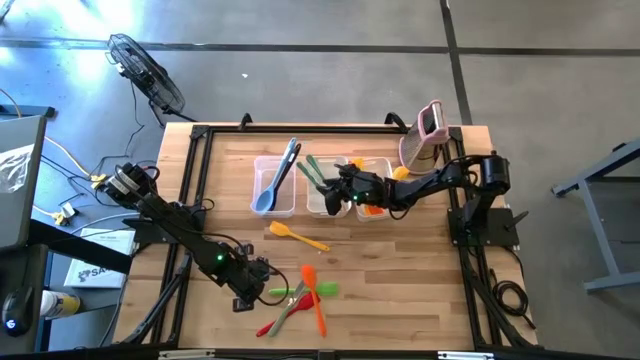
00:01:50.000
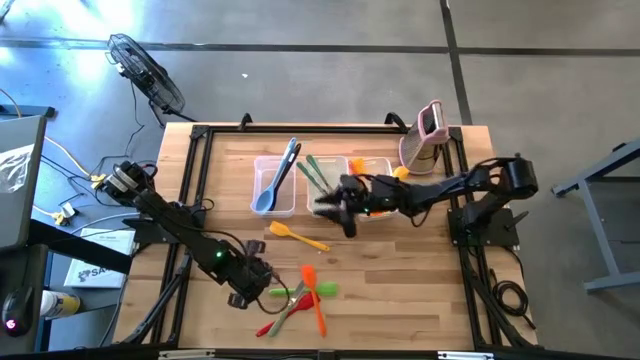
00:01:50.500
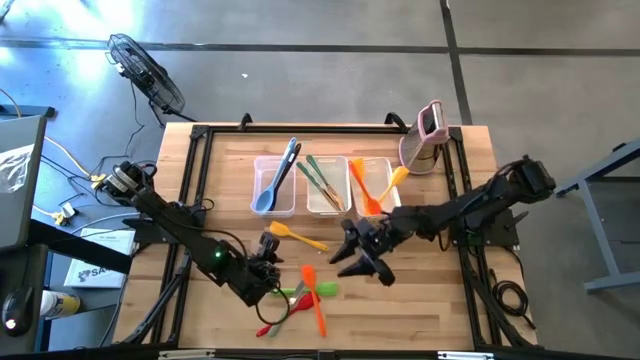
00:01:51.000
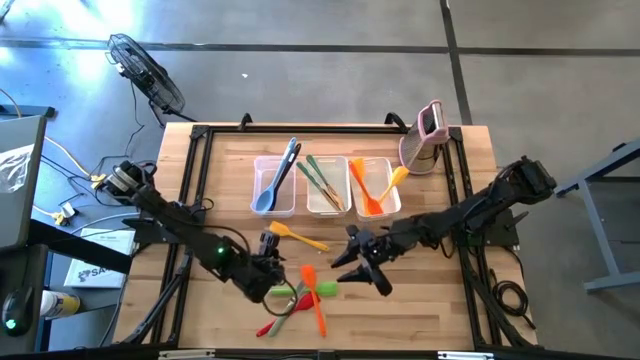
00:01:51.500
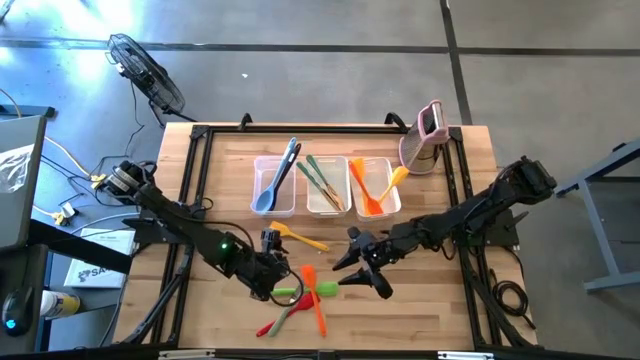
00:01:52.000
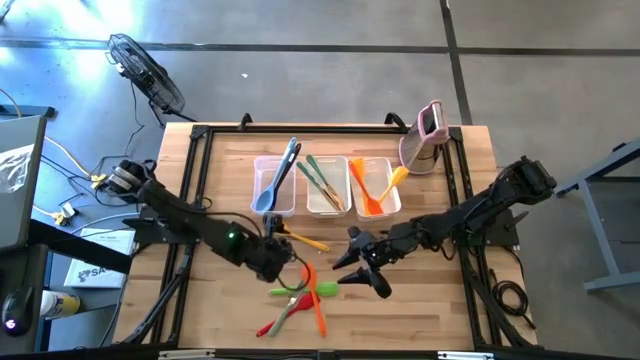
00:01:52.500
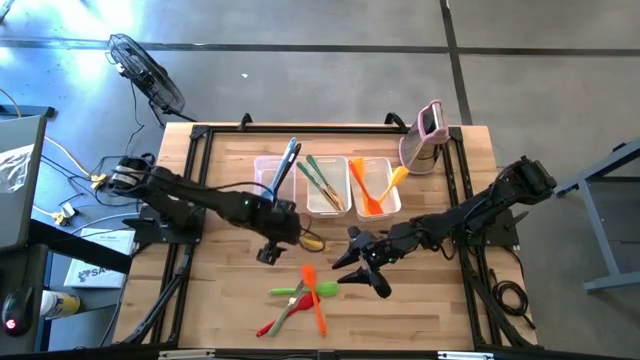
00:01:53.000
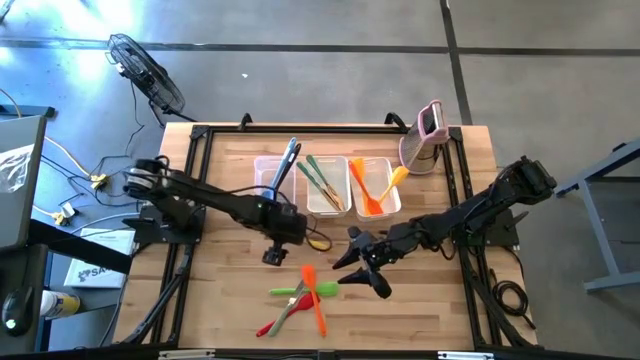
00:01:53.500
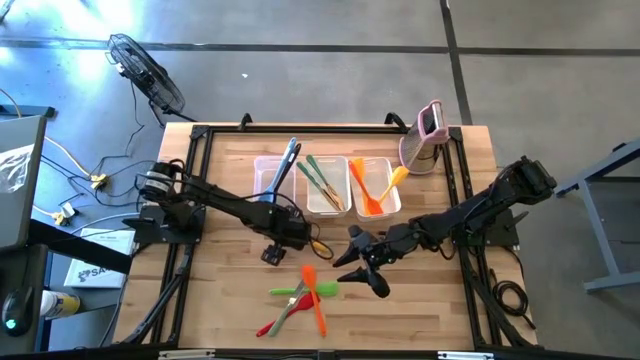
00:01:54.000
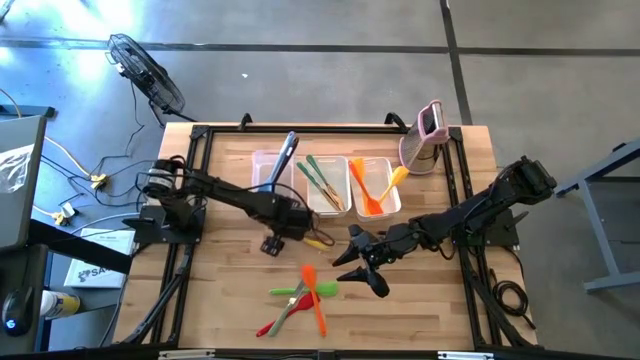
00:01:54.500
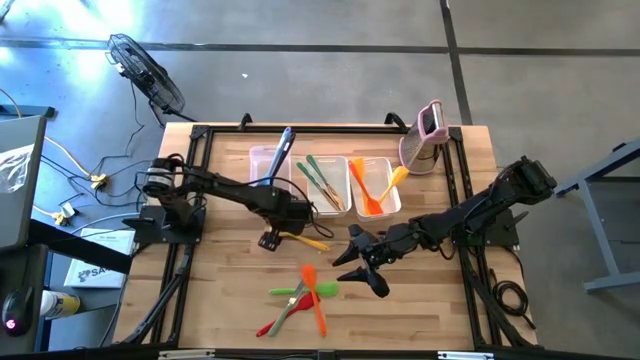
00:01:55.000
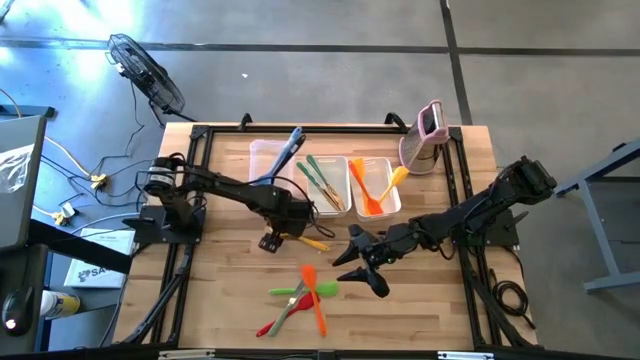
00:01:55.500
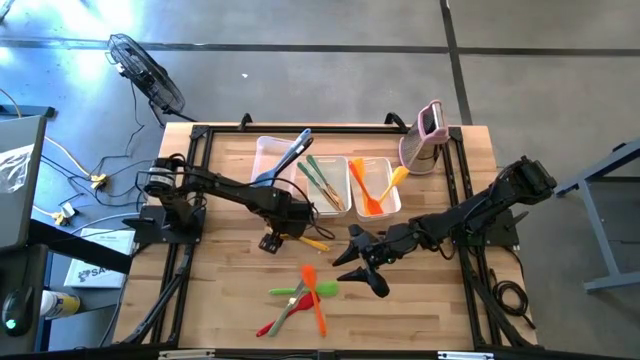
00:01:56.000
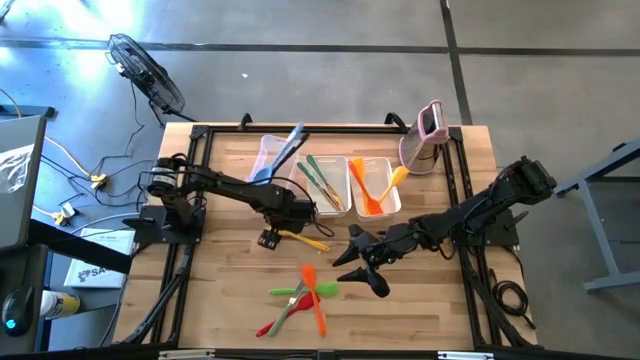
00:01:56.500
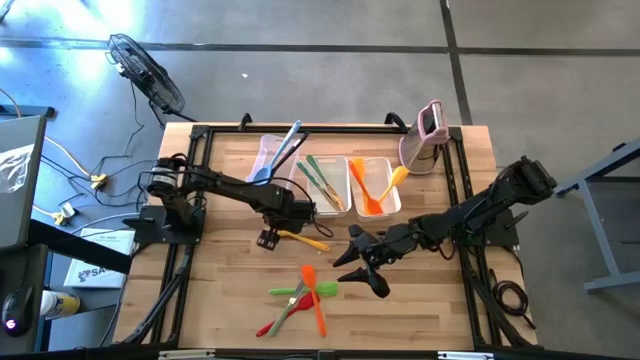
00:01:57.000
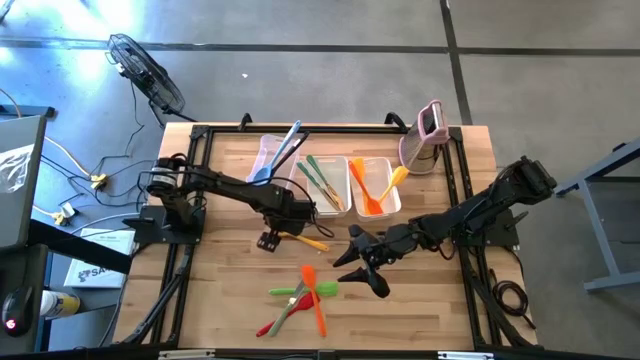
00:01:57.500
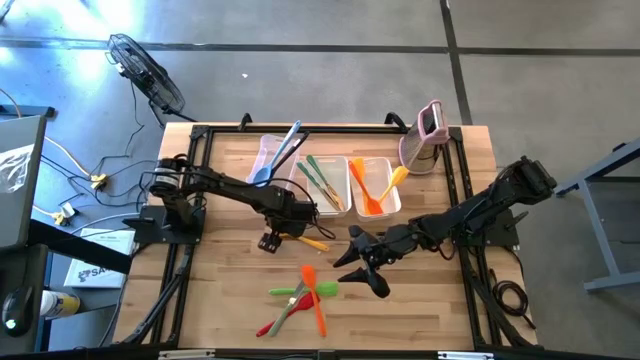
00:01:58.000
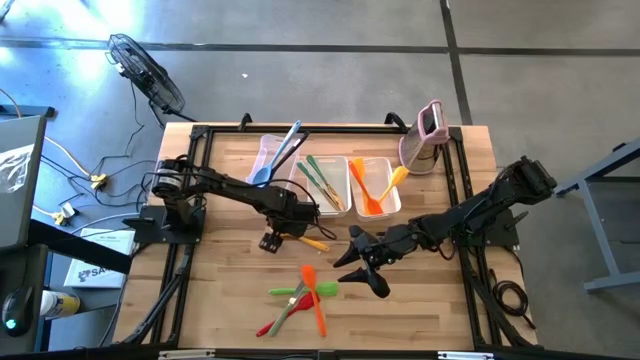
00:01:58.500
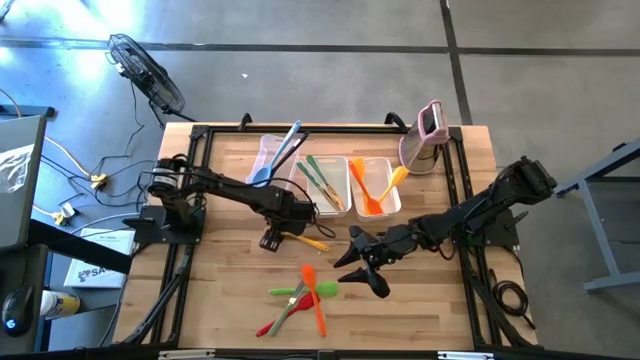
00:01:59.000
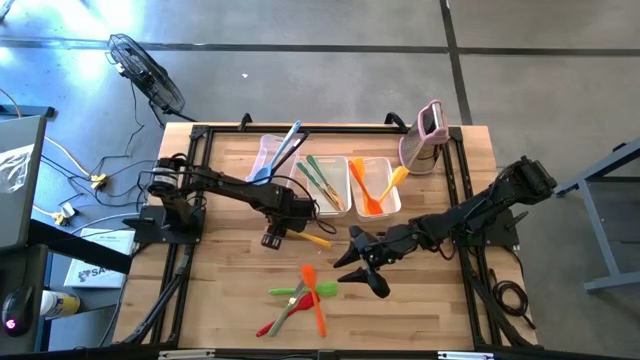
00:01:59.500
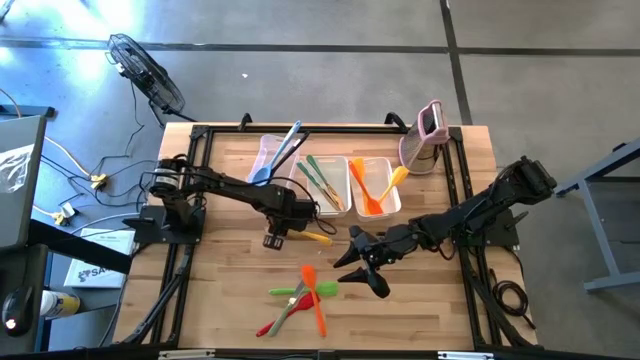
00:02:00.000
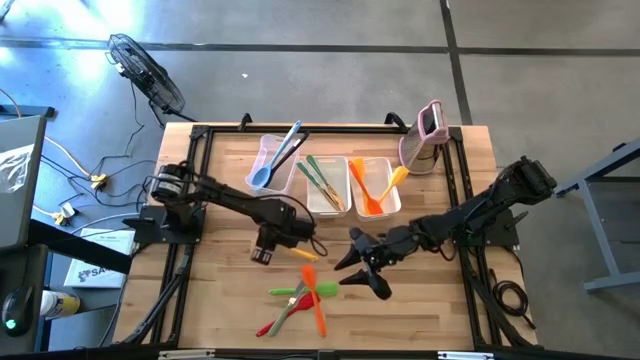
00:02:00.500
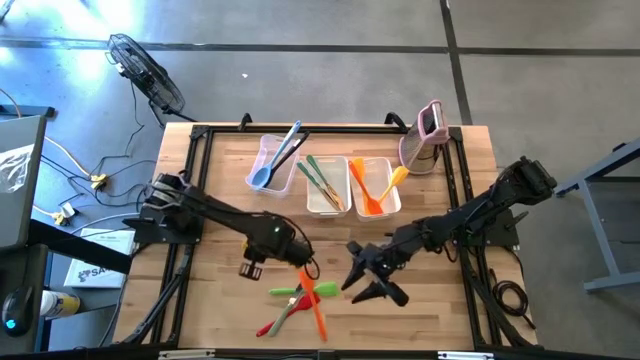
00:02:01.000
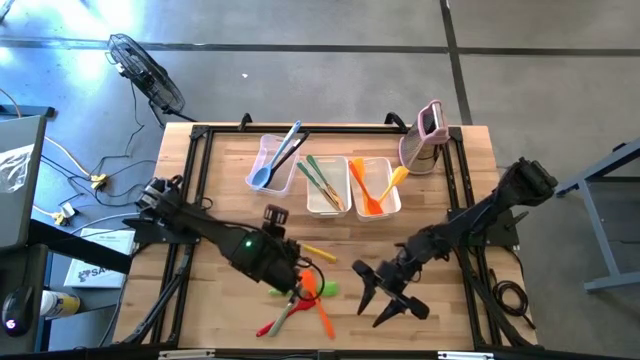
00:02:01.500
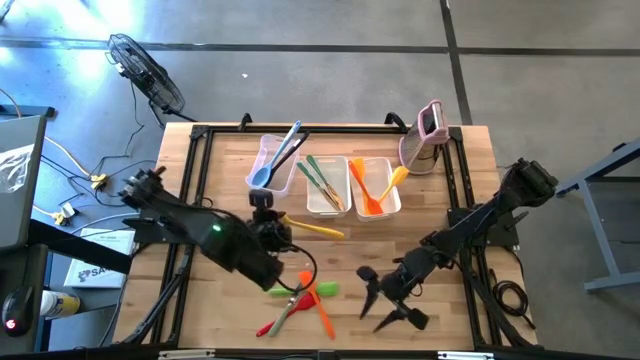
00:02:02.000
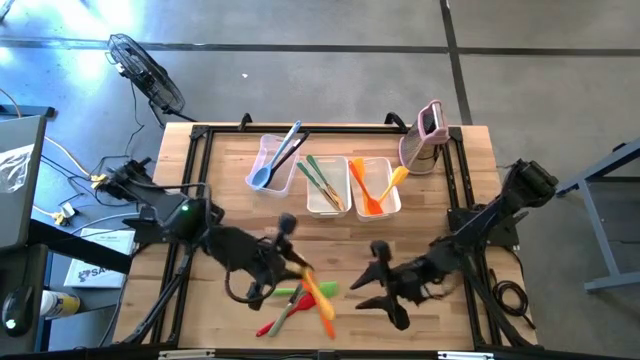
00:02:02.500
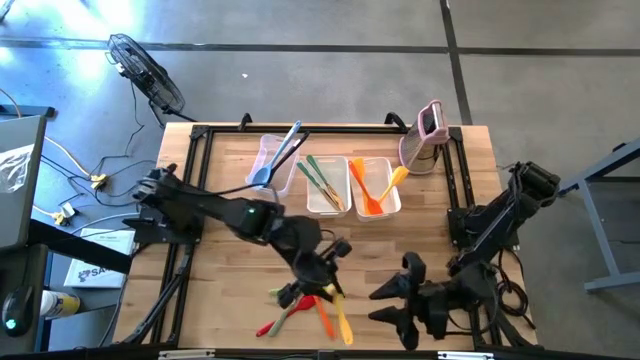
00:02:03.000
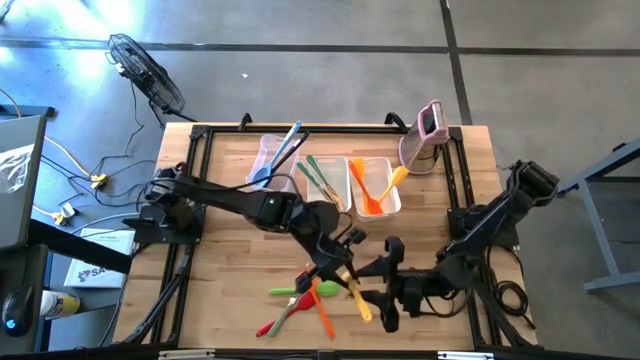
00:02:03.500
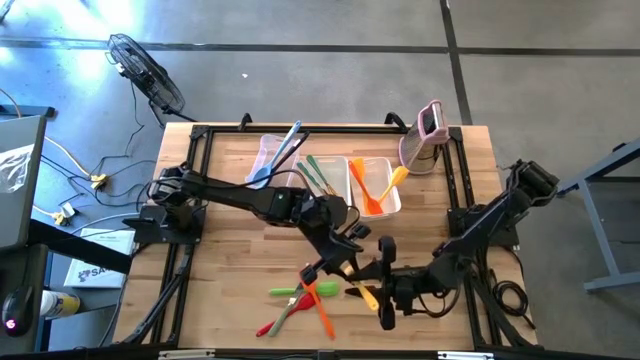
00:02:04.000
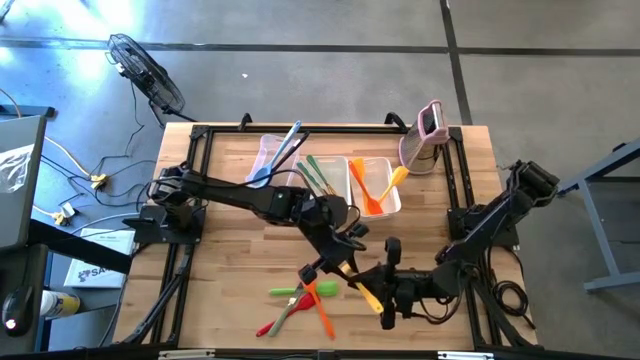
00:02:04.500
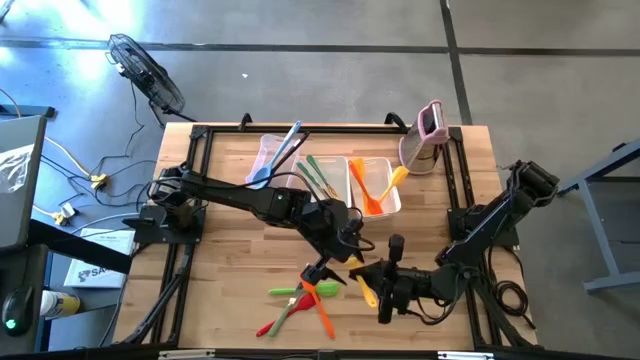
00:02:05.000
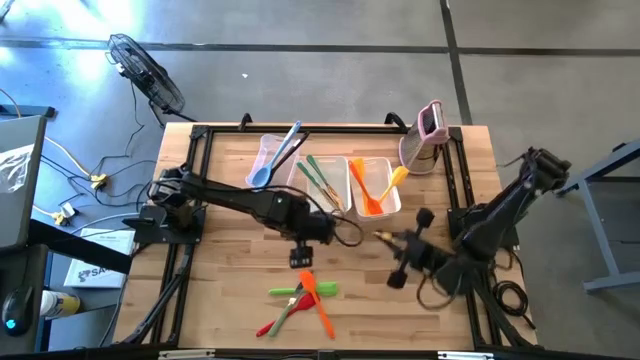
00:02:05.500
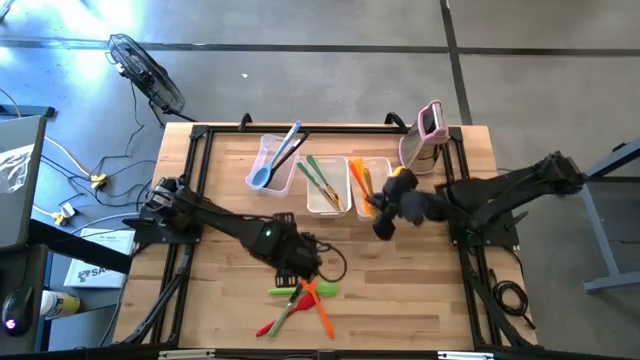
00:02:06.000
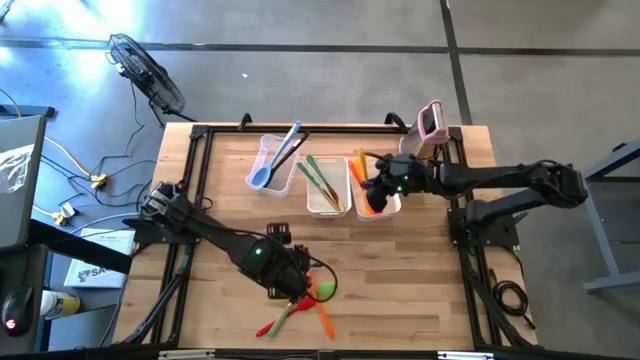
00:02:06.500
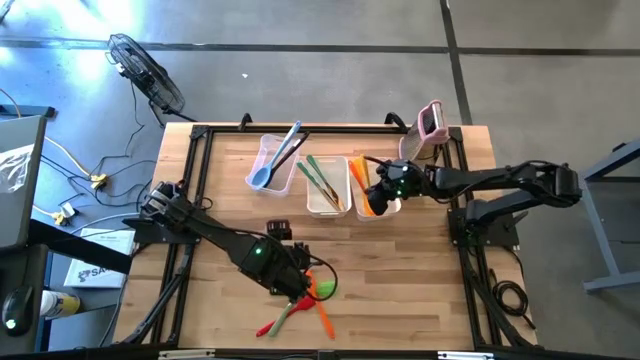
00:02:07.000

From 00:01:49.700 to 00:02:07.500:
Task: Pick & Place Kitchen Items
Put the yellow spatula into the right white bin

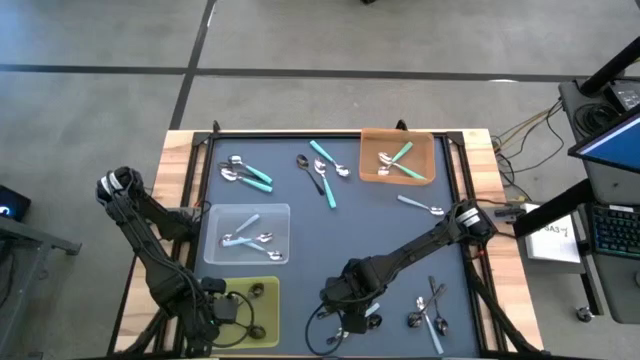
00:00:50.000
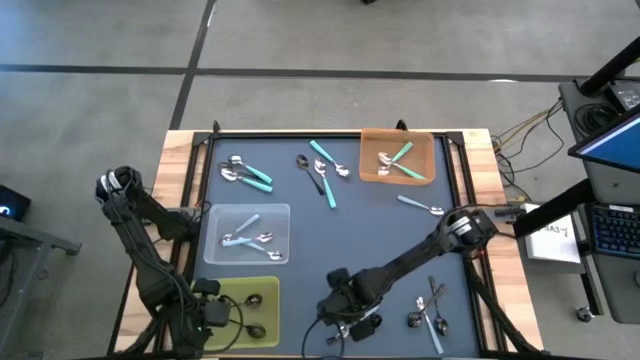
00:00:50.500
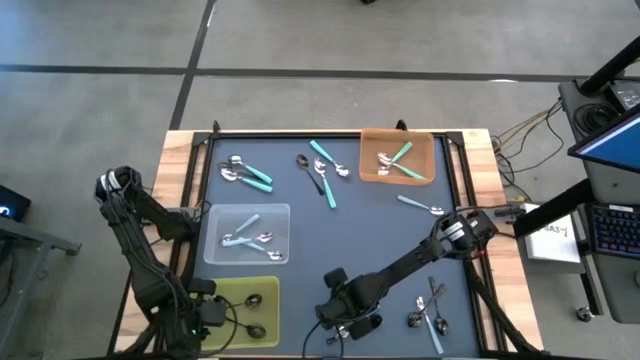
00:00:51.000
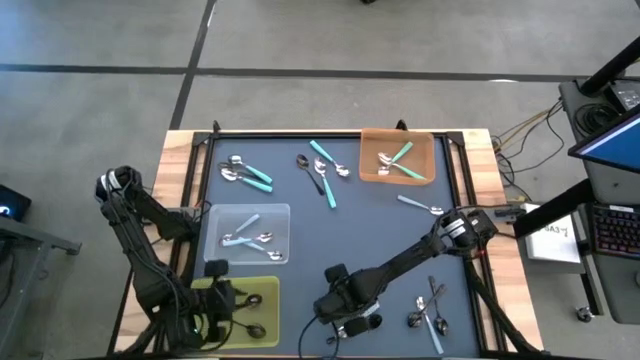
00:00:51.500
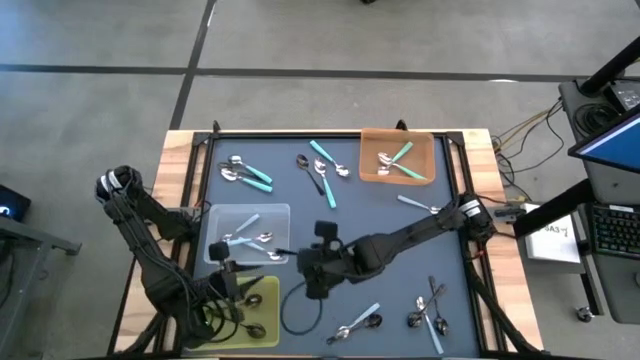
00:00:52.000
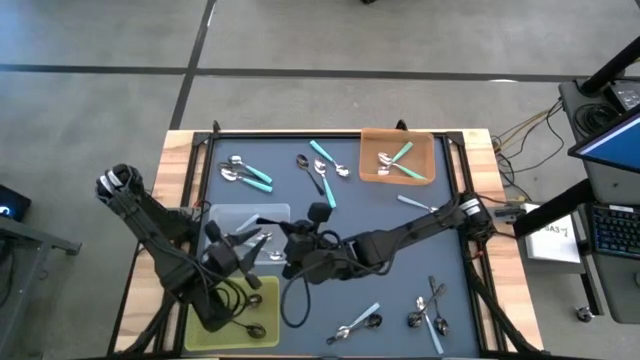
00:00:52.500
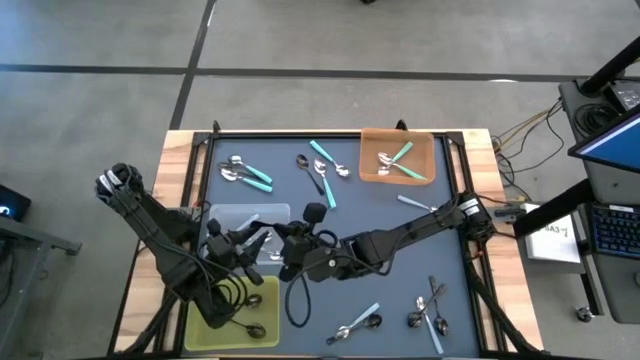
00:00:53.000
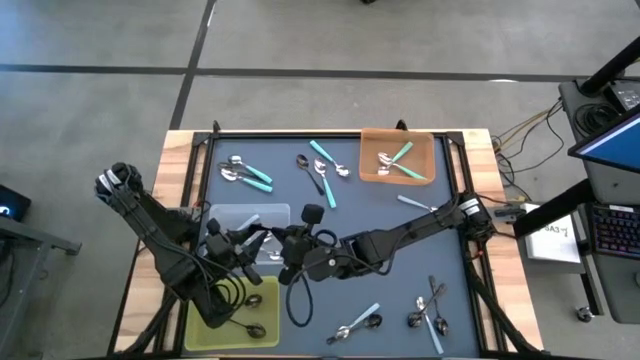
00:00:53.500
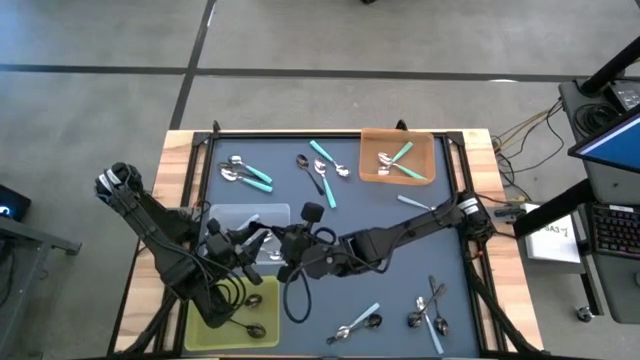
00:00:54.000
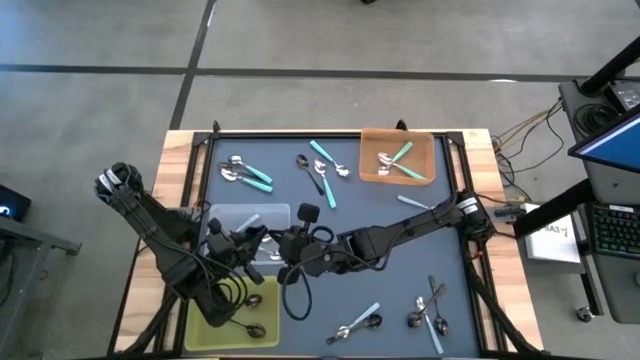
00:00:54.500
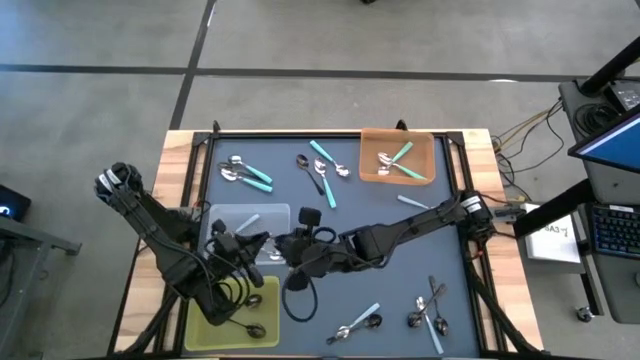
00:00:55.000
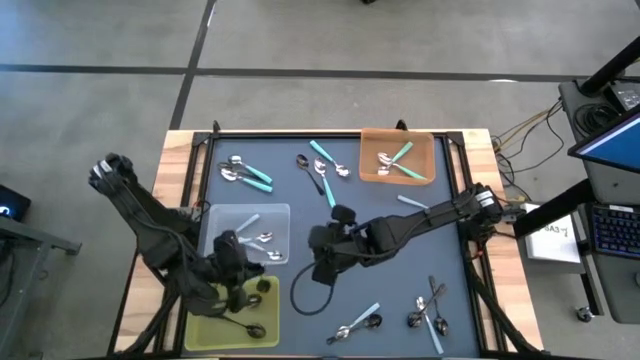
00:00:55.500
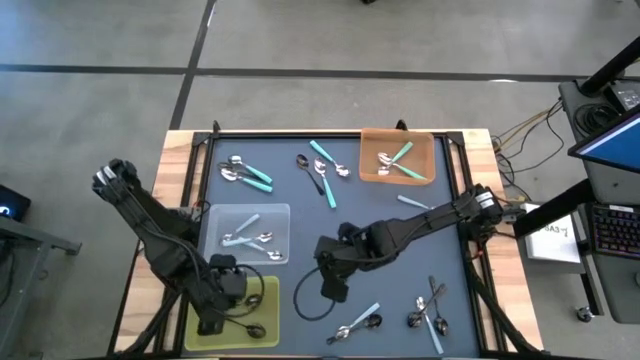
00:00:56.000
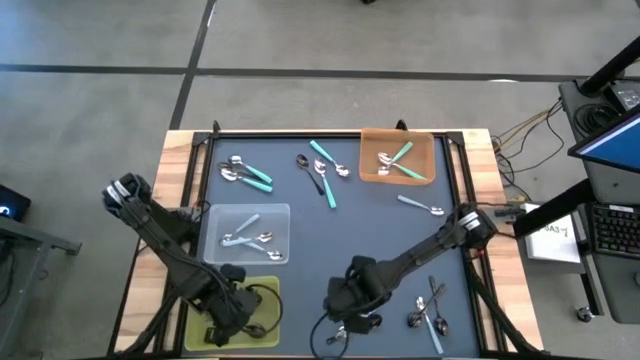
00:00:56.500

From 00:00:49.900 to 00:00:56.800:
Task: Sort silverware by color (type)
Put the black spoon into the yellow bin
